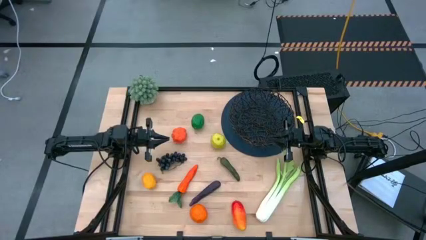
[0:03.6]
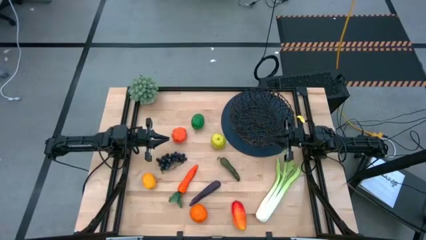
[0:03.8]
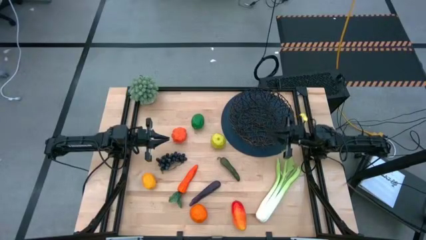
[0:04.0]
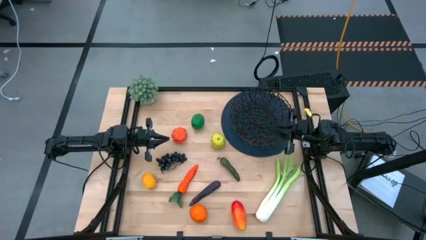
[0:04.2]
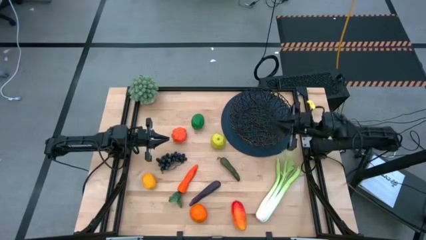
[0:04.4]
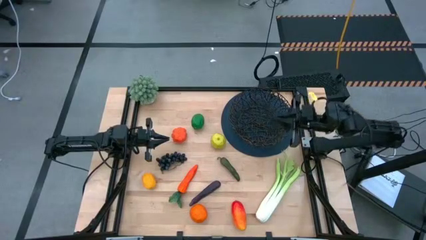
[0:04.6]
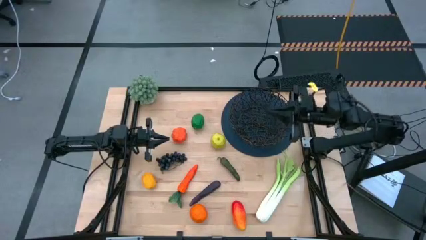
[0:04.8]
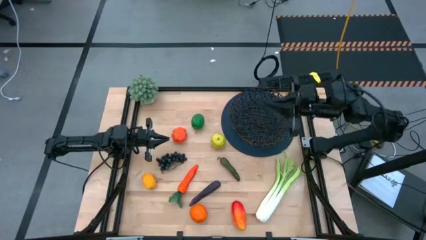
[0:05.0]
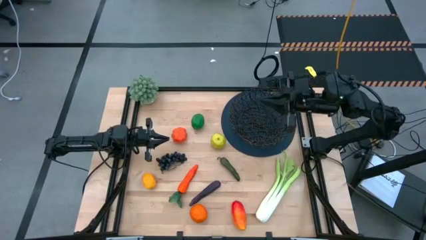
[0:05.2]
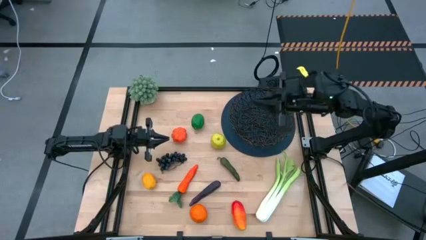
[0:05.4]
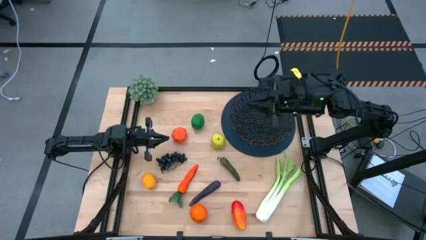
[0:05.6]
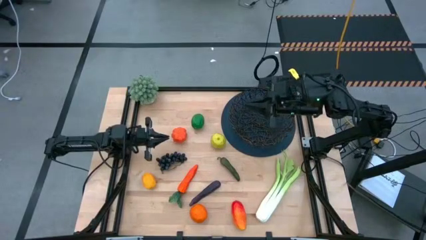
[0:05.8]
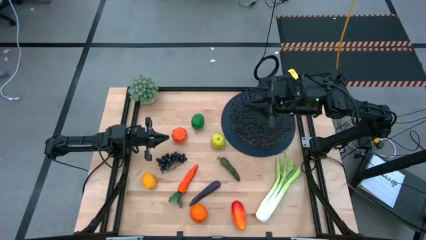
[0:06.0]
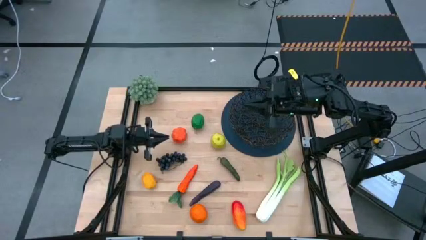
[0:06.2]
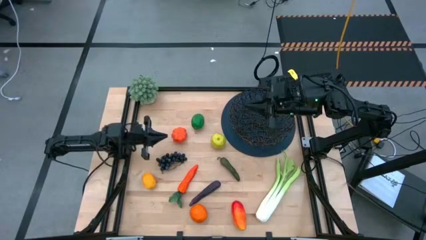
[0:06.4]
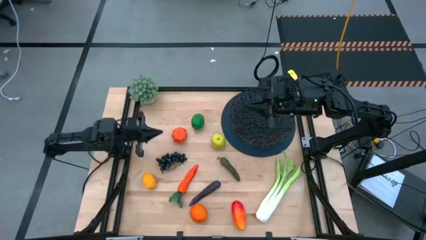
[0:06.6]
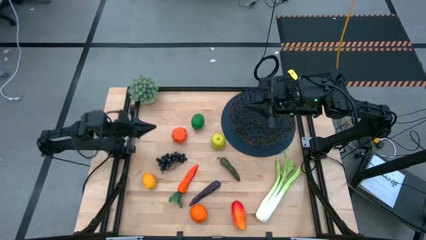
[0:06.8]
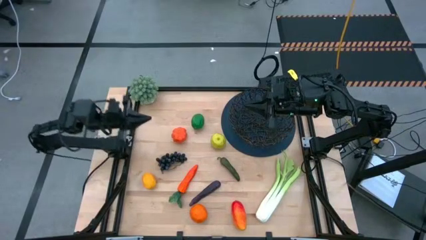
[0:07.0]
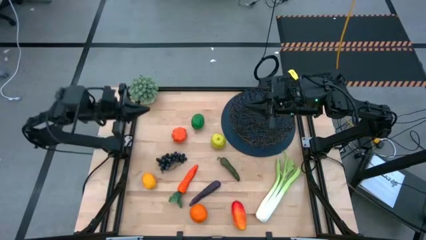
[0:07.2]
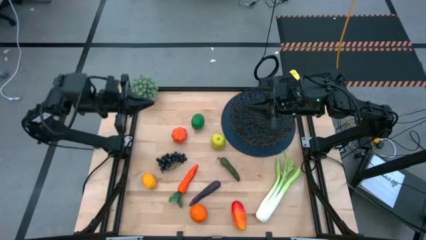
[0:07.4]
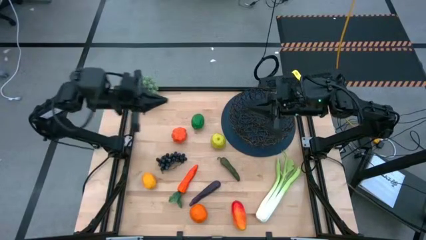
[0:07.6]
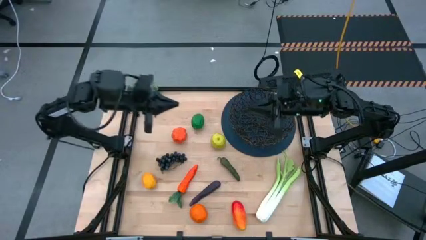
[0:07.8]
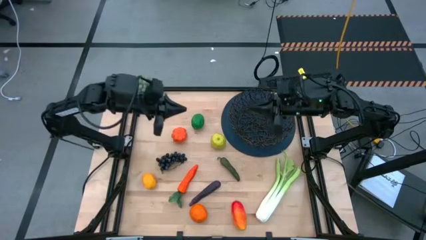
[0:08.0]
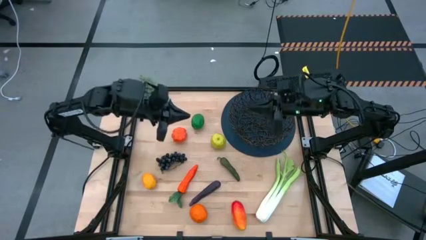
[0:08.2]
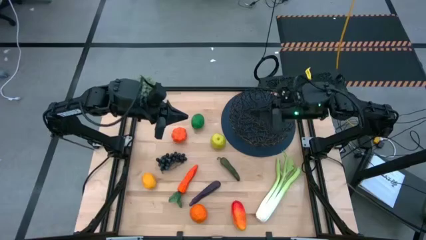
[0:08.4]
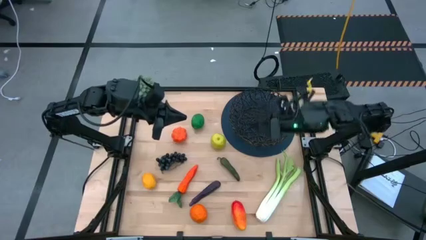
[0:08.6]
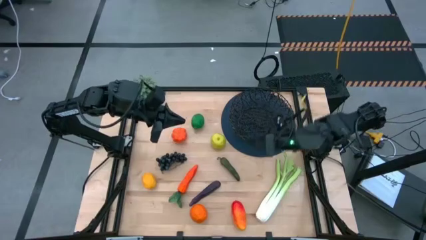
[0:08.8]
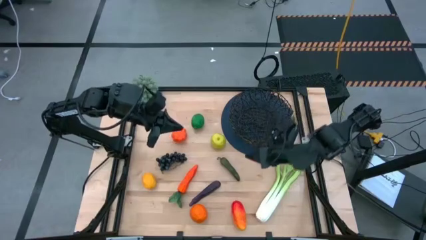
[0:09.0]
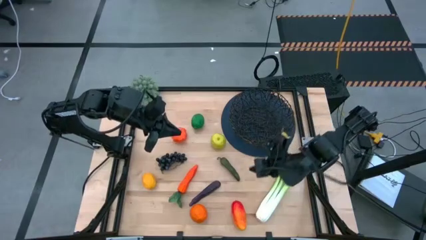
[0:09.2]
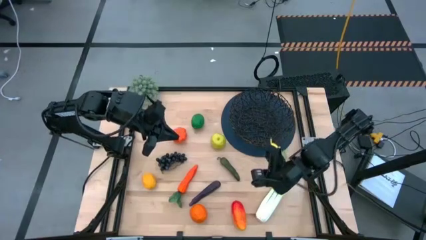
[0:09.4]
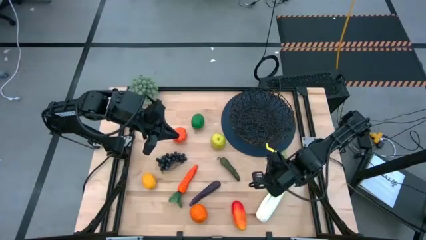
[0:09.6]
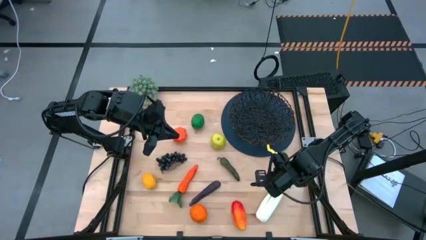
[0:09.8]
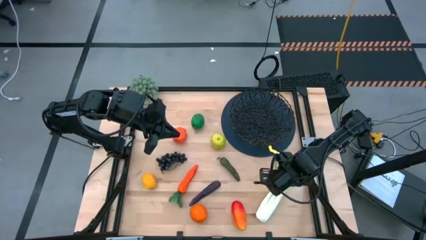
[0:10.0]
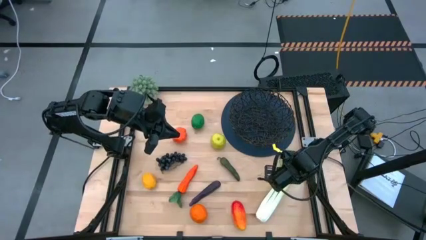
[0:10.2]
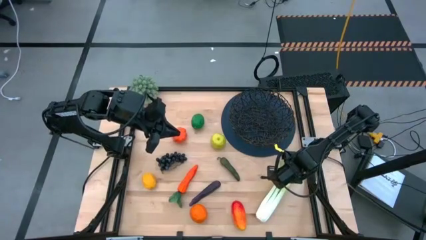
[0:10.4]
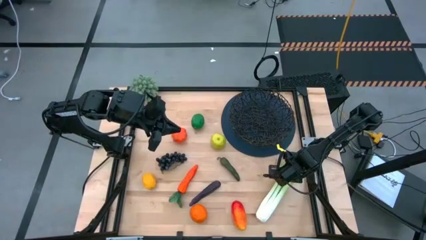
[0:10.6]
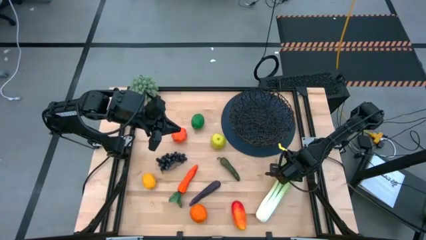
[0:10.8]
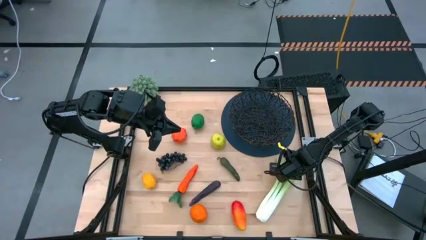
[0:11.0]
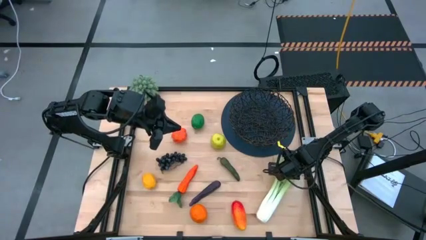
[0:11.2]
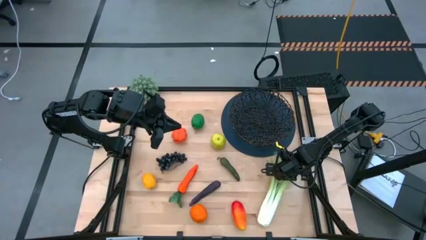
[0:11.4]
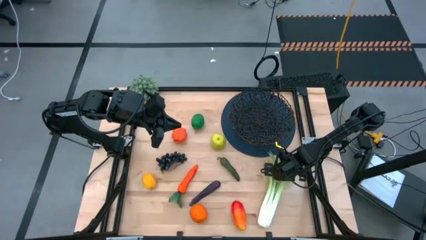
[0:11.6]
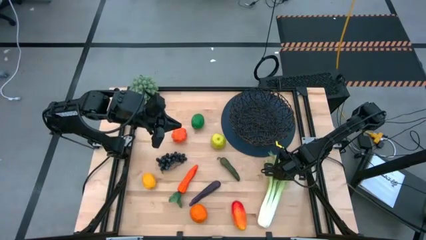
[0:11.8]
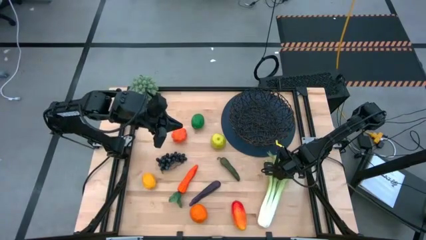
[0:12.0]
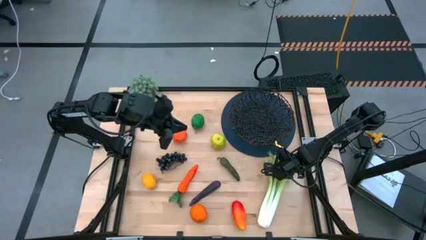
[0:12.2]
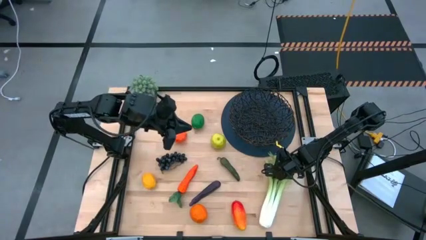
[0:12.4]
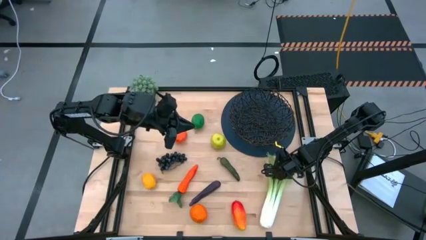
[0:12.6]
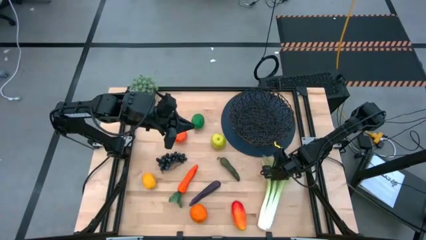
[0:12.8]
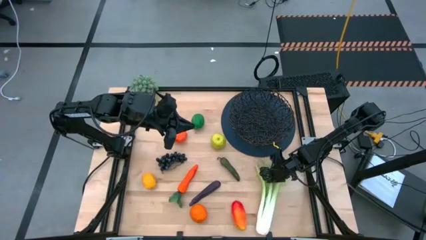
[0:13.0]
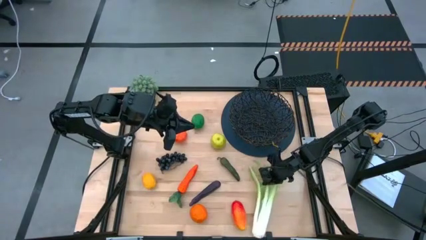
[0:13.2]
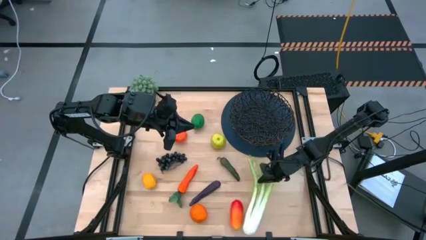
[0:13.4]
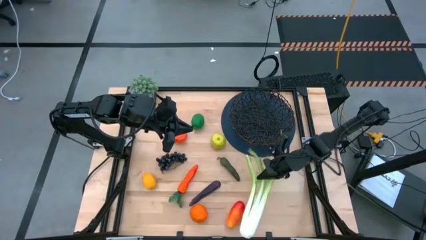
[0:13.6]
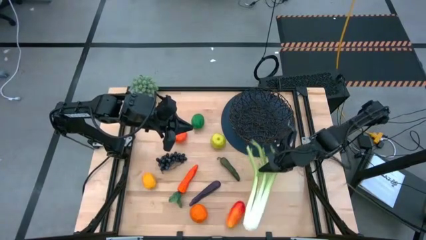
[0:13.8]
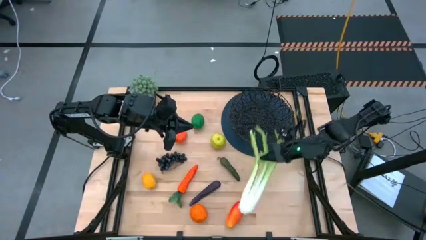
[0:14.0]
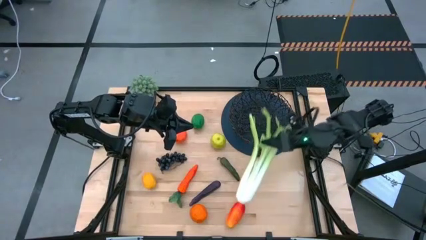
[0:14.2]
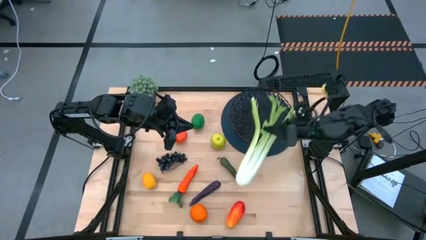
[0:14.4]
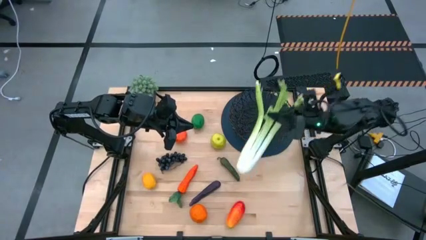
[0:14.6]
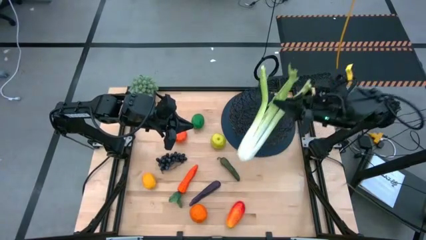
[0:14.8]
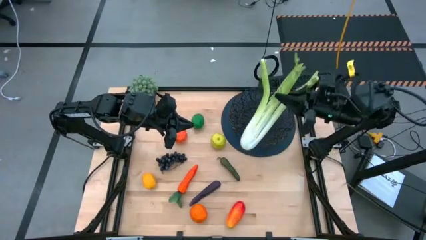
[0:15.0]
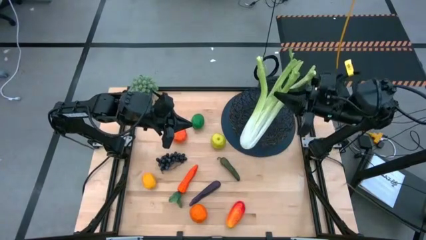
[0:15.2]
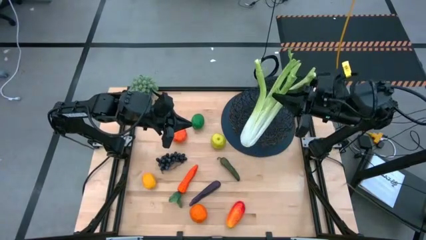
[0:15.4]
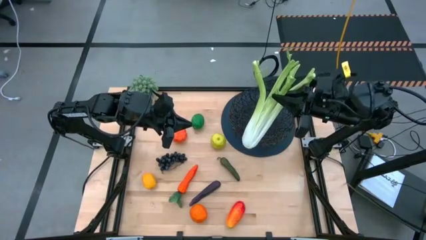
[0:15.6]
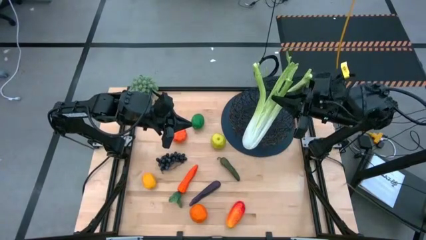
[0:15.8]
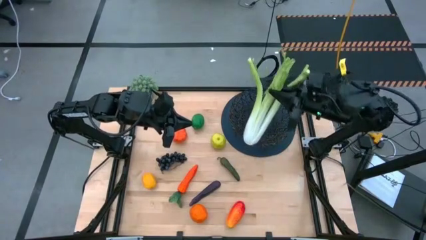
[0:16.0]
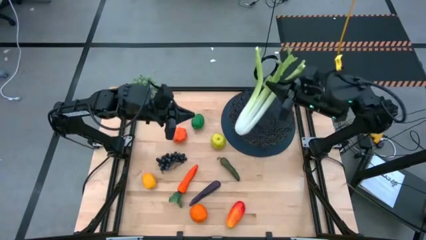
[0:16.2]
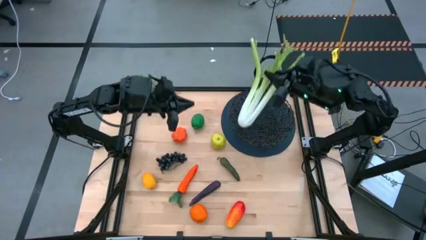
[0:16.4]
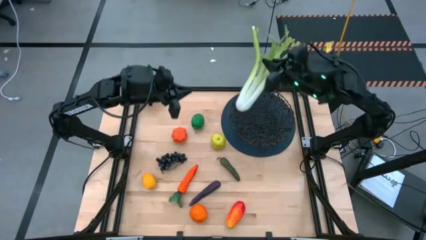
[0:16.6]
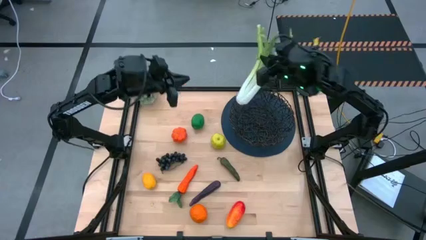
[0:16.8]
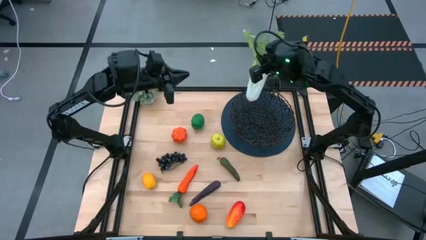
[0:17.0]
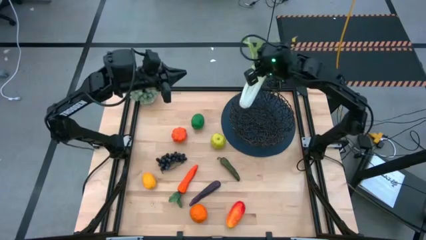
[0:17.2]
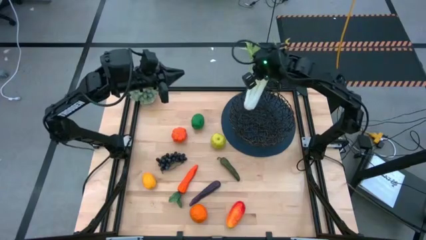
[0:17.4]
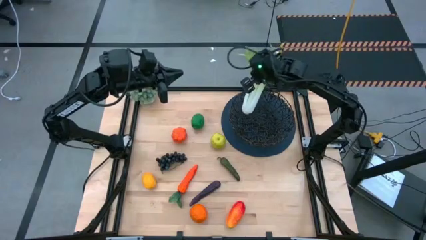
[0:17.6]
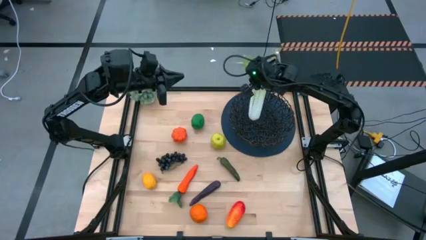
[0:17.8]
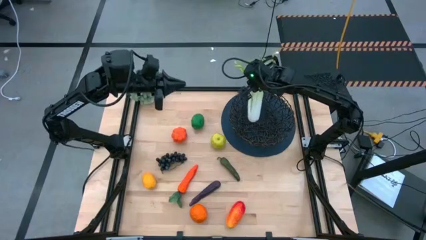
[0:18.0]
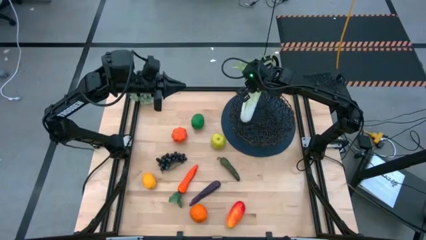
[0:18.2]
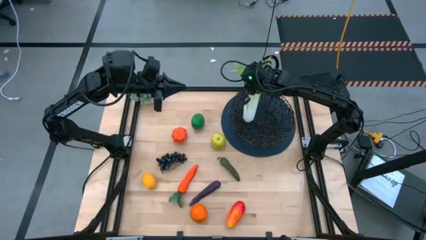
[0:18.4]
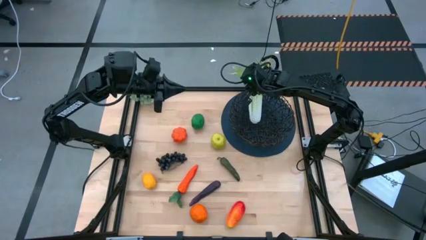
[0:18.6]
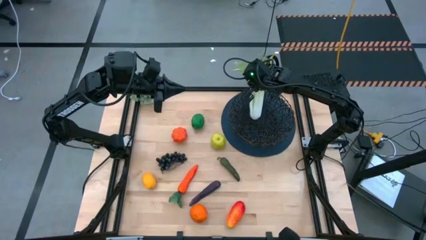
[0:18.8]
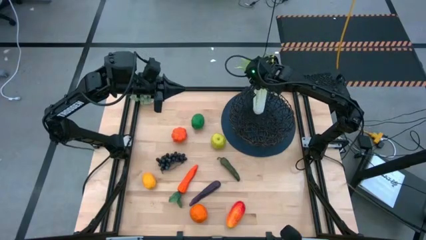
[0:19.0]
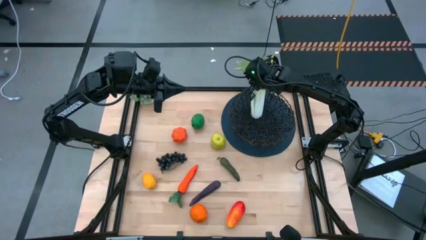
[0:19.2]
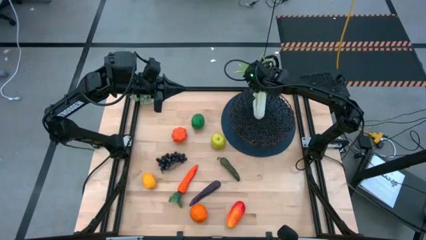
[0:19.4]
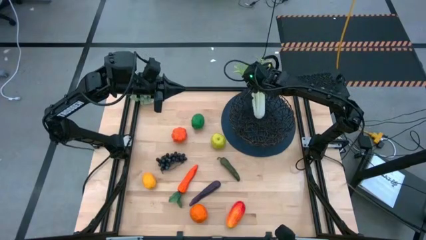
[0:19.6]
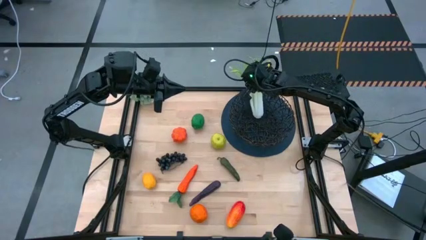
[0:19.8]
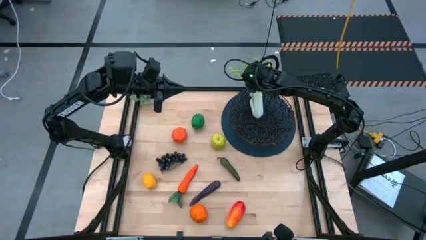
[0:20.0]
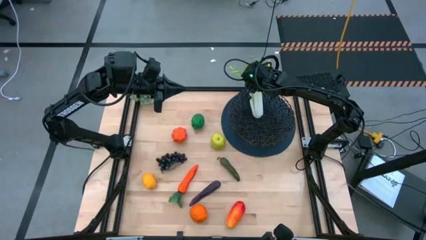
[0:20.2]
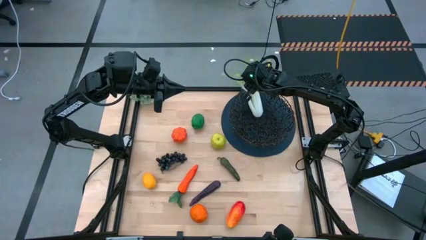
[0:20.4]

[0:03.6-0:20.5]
Task: Build produce basket
Put the green celery into the black woven basket
